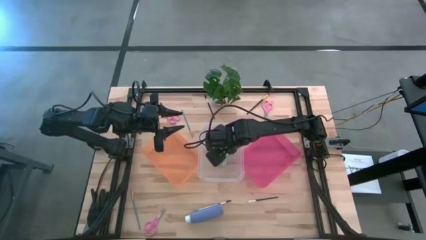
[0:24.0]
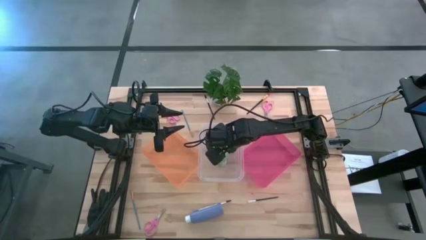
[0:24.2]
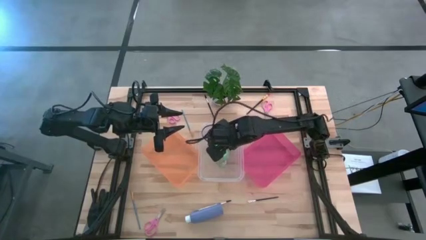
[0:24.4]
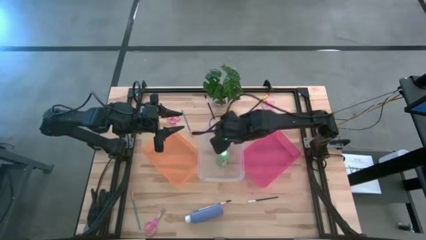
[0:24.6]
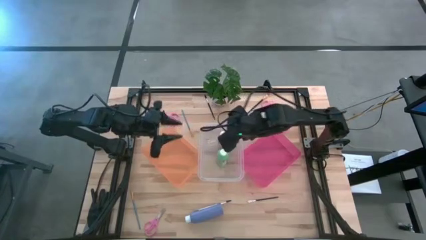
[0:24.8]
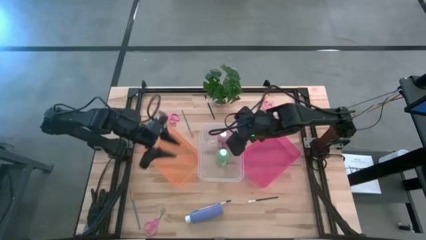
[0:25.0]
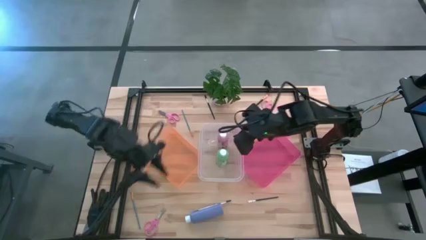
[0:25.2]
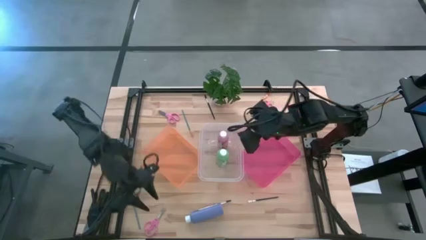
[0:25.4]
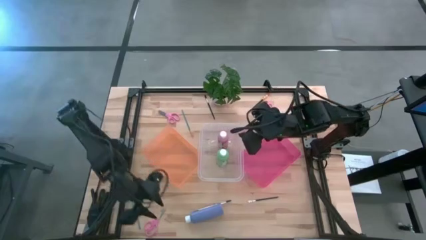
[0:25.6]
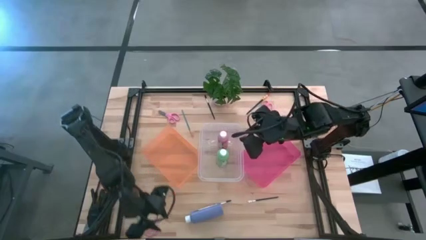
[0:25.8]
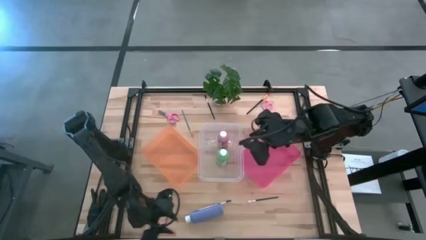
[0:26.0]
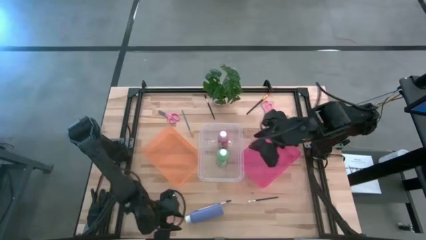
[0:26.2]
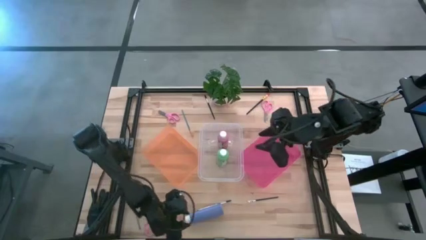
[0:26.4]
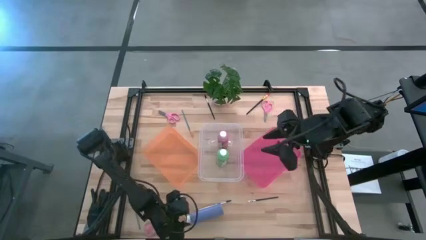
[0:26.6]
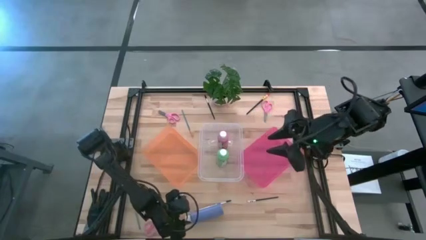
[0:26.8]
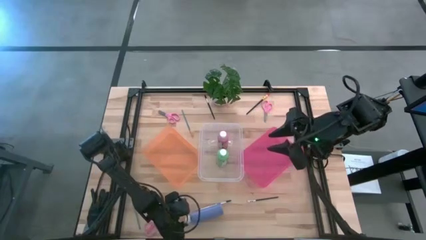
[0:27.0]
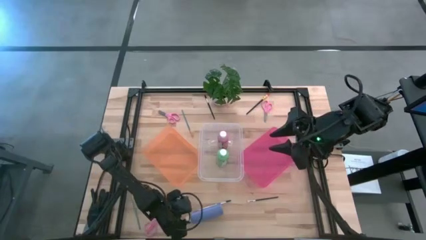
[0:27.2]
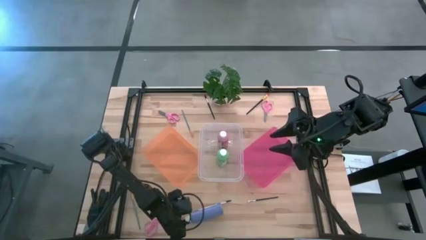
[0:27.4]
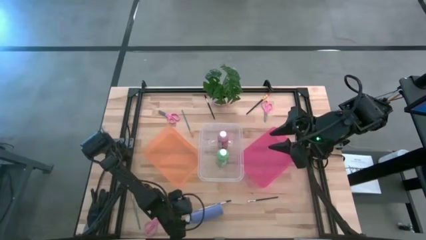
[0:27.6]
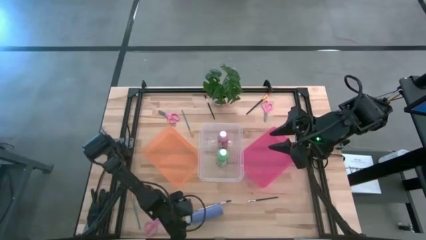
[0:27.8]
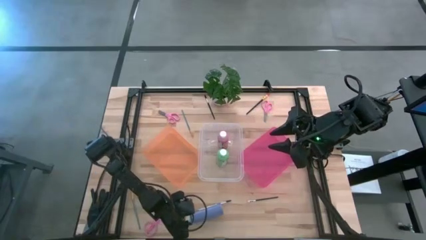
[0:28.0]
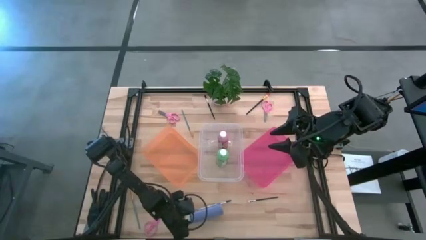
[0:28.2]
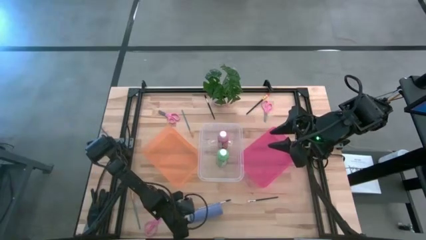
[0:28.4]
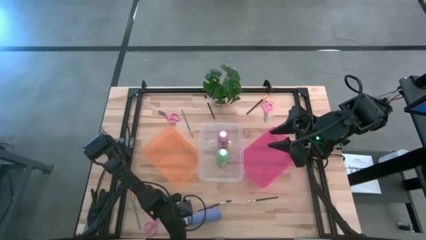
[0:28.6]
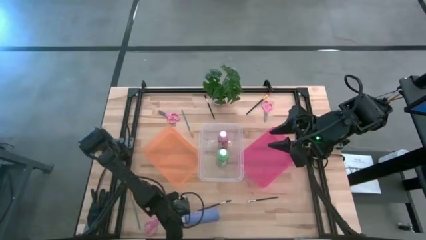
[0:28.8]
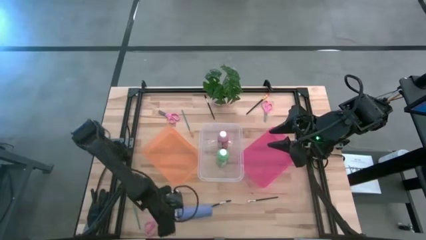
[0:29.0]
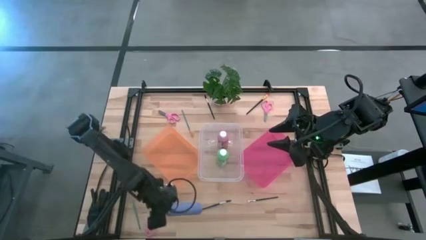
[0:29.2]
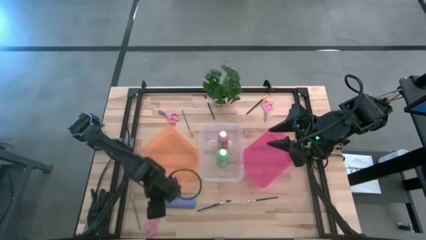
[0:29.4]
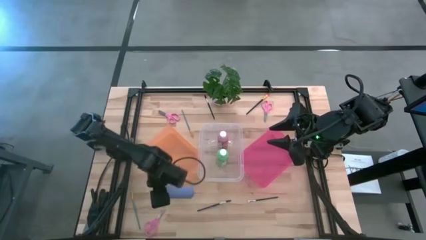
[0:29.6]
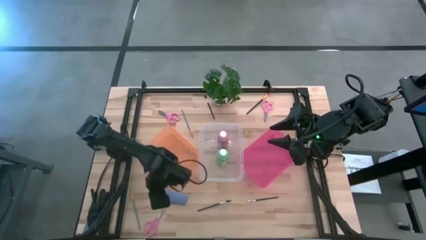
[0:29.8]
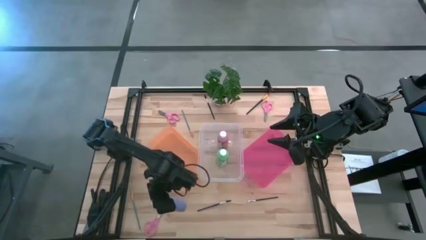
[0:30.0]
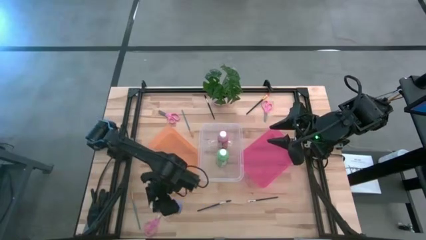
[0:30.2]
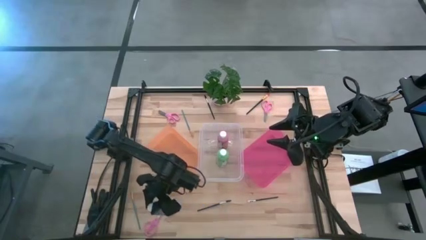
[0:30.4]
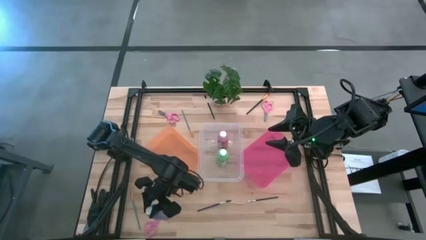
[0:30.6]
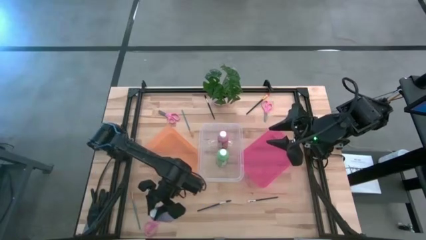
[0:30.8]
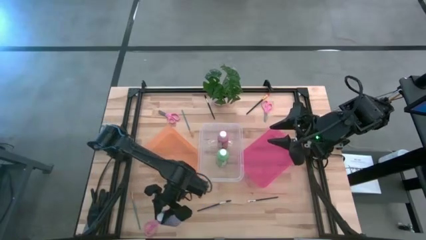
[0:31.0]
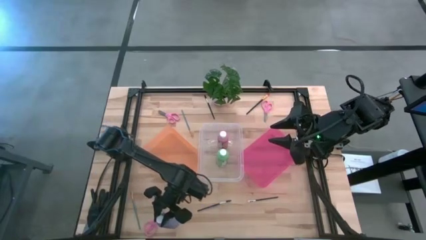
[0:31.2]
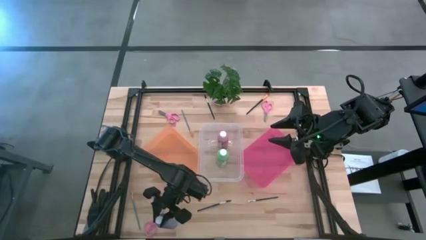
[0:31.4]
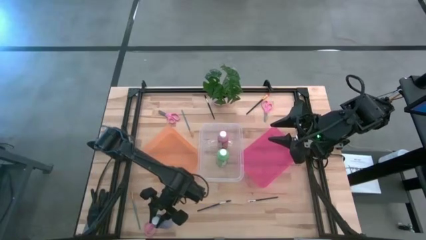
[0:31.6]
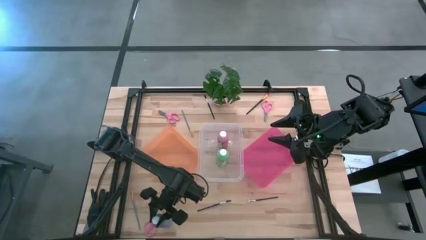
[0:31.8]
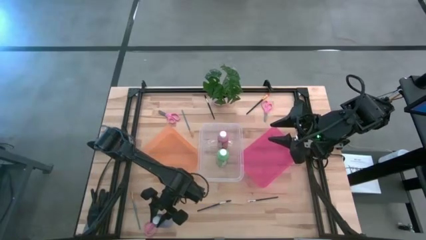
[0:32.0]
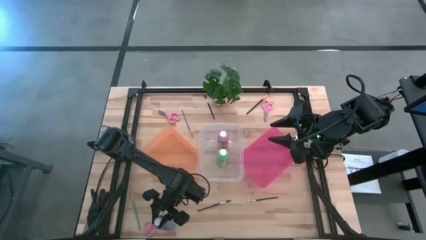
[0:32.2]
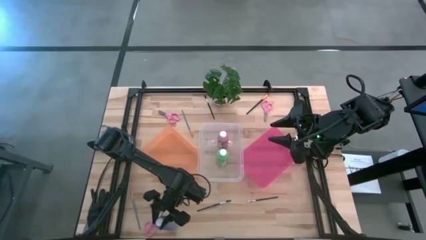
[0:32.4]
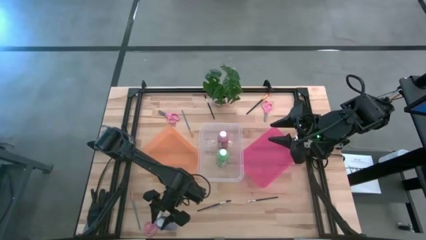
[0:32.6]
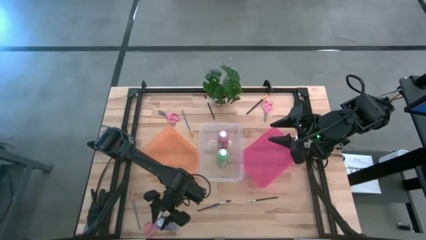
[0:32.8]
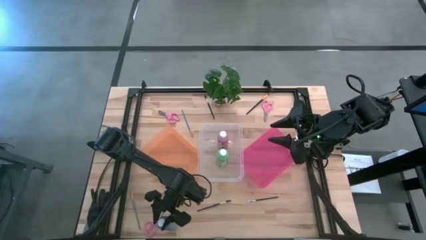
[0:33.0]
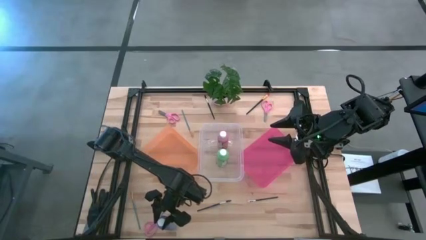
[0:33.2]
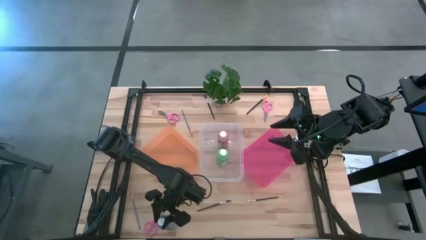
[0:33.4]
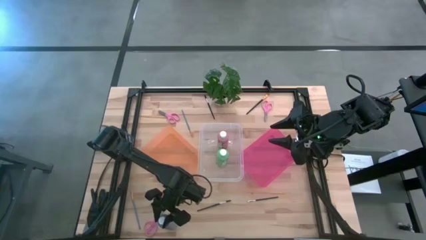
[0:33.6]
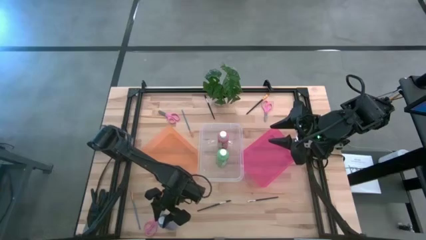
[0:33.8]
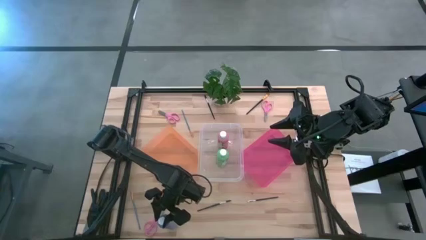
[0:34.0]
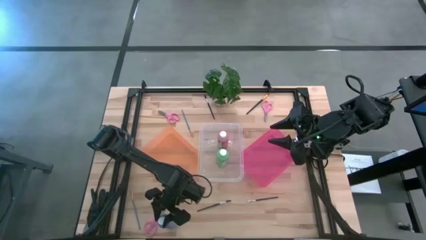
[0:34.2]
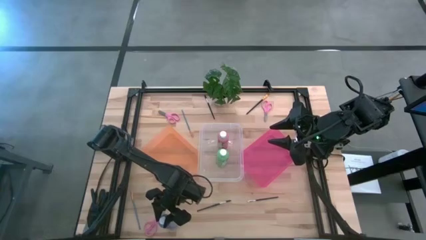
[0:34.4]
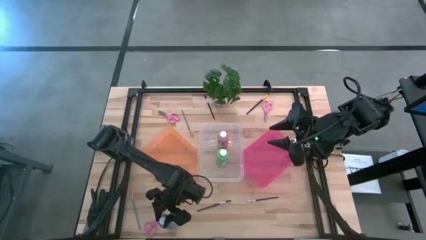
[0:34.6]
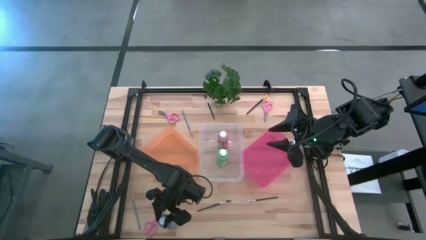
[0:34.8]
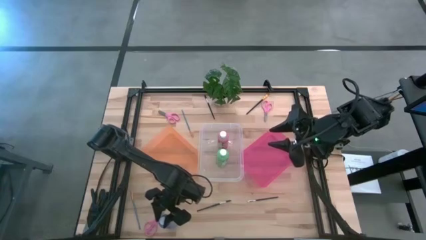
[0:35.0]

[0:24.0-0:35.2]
Task: Pick & Place Paint Supplies
Move the blue paint bottle to the bottom left of the table

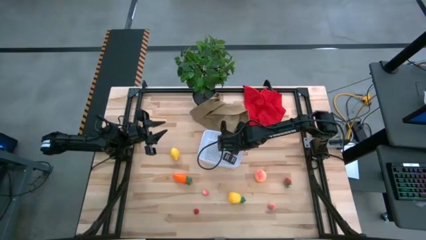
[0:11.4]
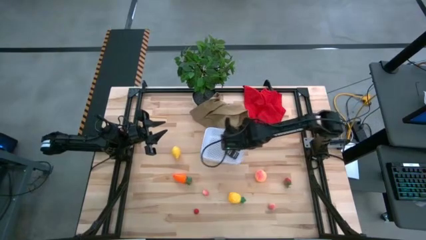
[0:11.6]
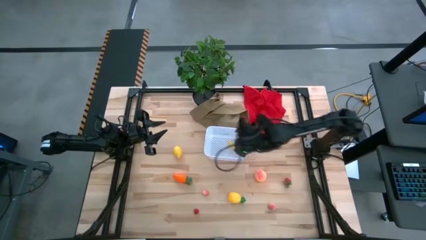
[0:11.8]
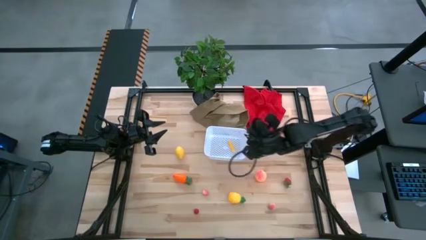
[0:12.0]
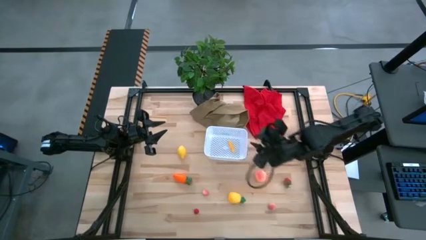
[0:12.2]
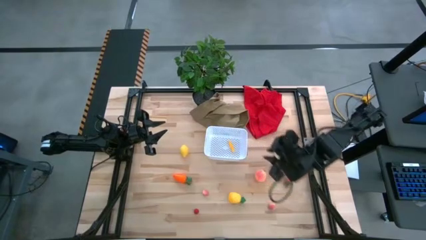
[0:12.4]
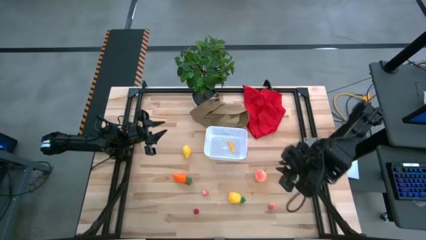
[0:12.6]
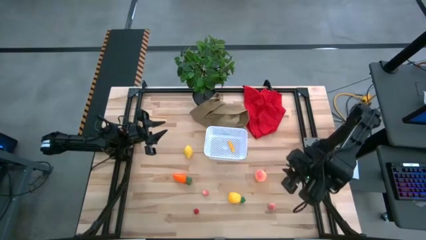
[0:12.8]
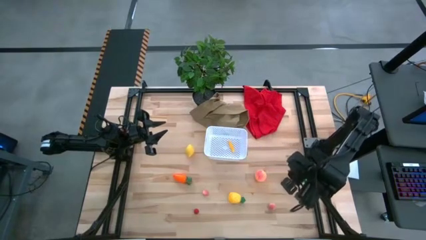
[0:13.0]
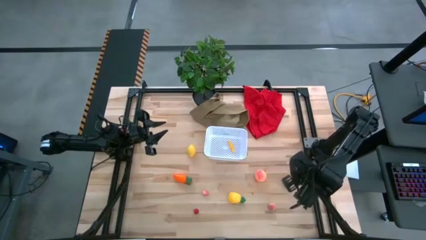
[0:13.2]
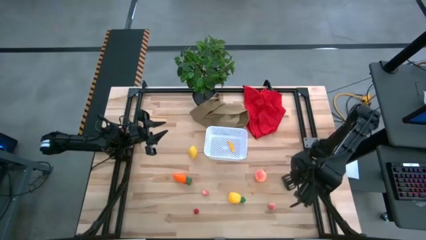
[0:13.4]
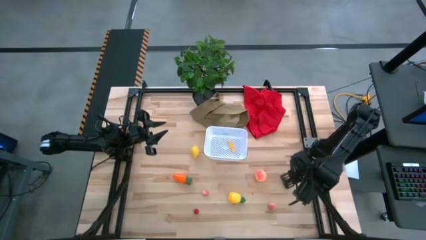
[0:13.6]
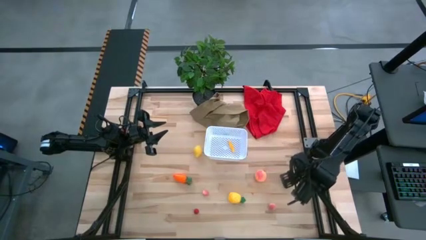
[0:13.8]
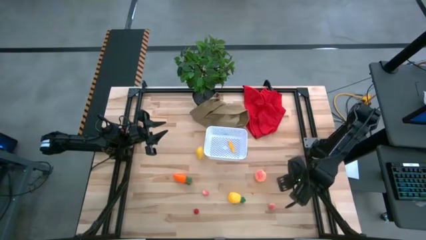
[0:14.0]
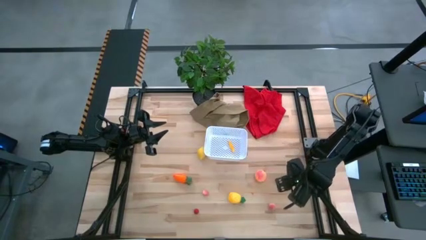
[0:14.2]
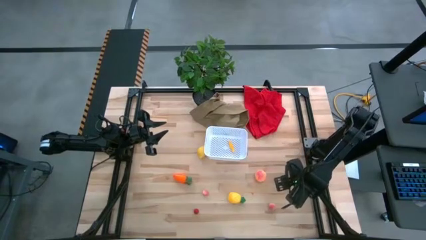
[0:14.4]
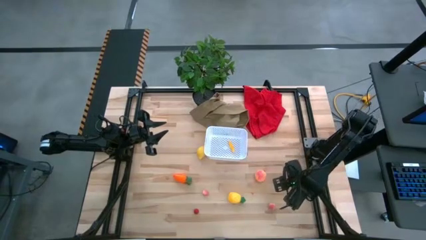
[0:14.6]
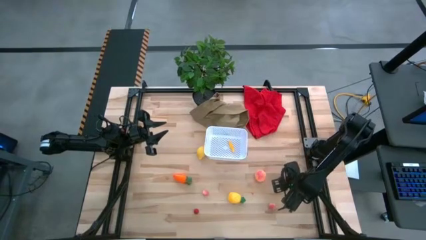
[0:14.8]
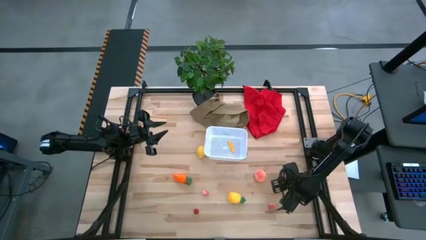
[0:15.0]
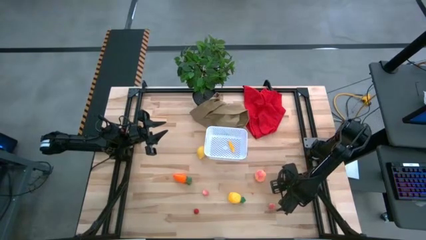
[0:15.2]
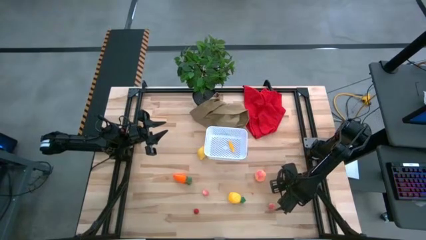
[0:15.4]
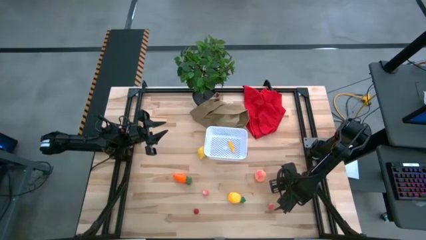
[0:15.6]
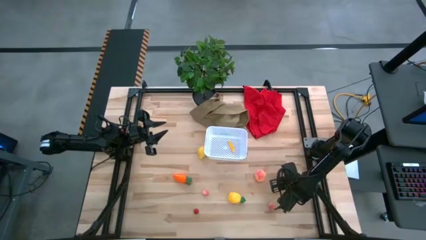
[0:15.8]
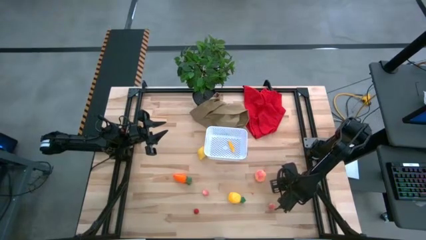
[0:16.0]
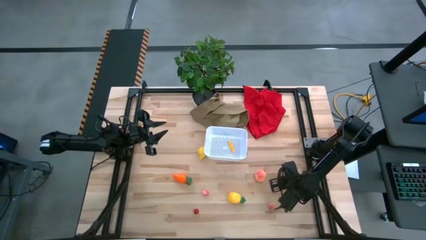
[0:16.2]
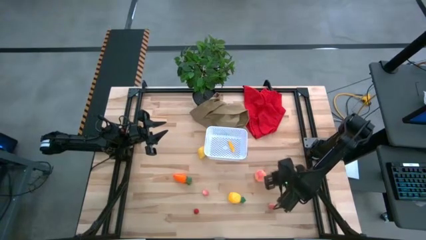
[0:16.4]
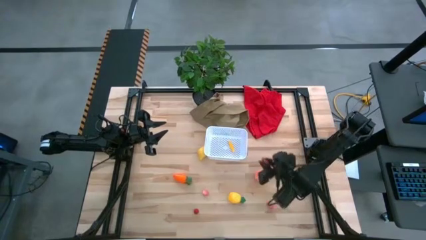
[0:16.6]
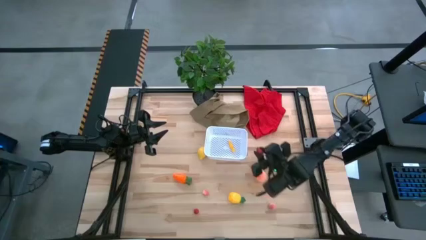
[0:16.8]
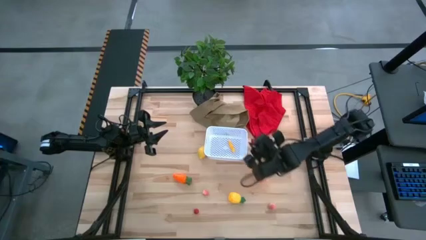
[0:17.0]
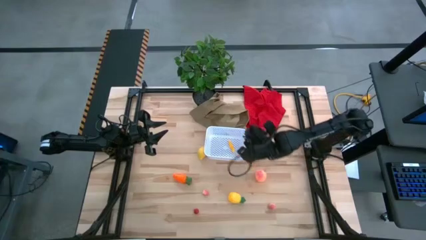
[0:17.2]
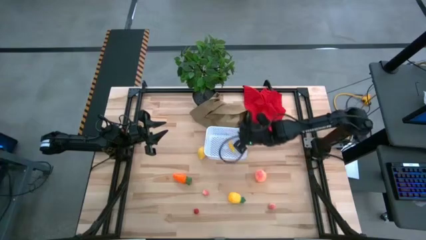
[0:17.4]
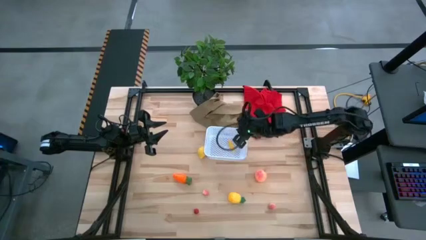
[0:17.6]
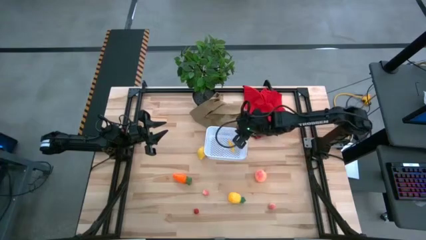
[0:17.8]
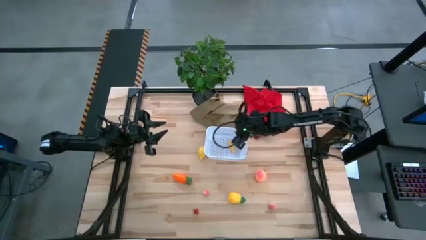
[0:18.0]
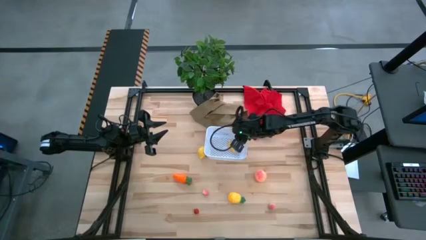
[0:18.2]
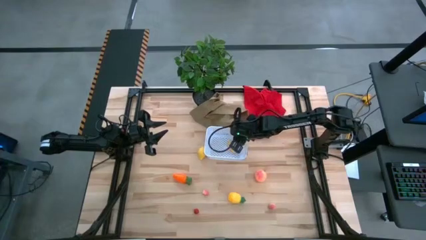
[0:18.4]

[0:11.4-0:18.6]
Task: Pick and placing Produce into tupperware
Put the strawberry into the bin
